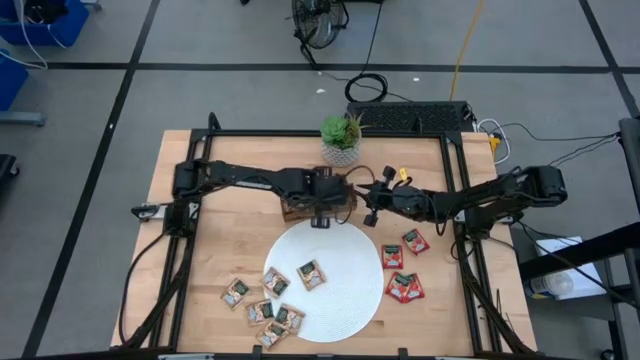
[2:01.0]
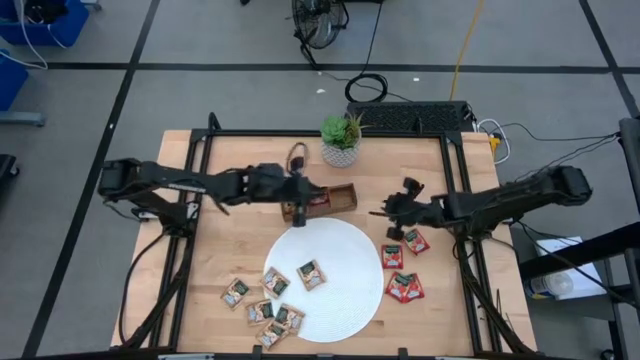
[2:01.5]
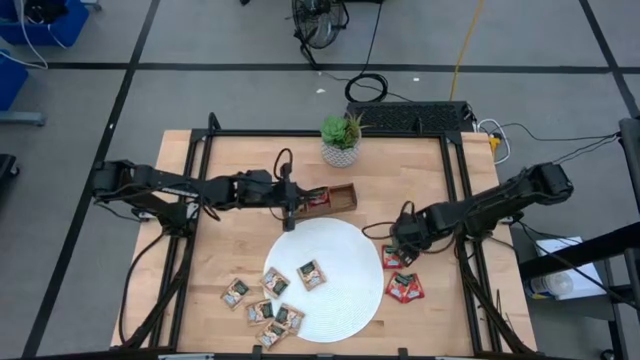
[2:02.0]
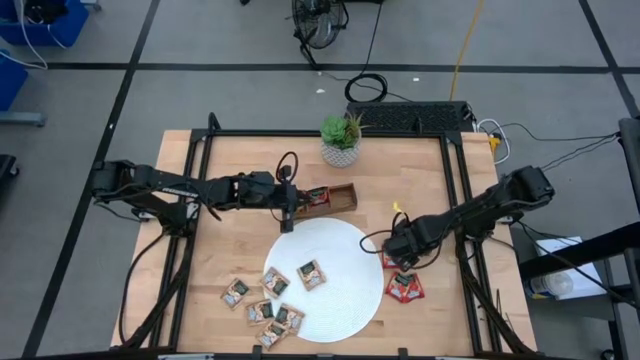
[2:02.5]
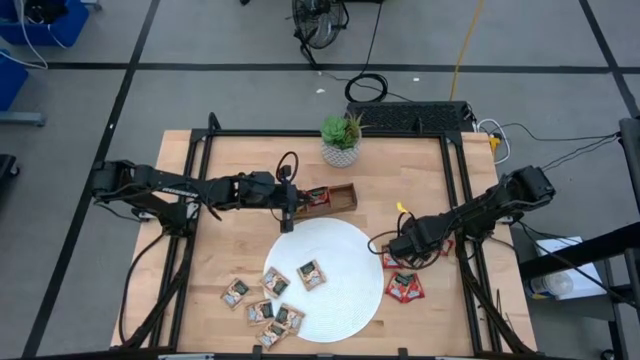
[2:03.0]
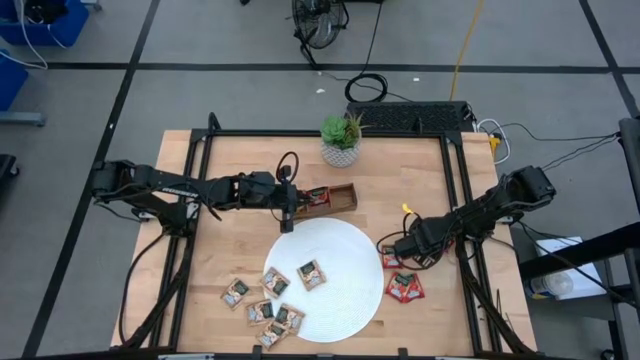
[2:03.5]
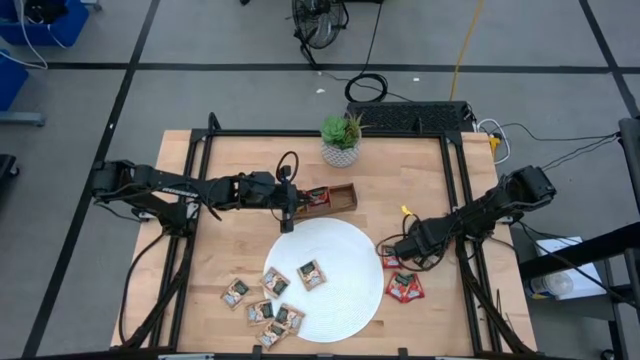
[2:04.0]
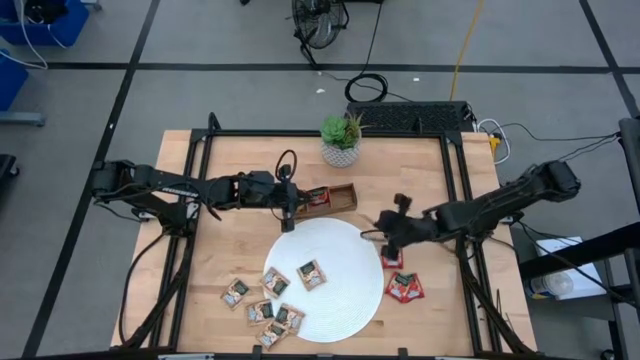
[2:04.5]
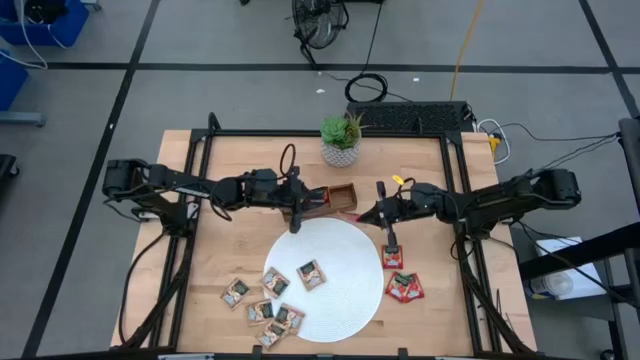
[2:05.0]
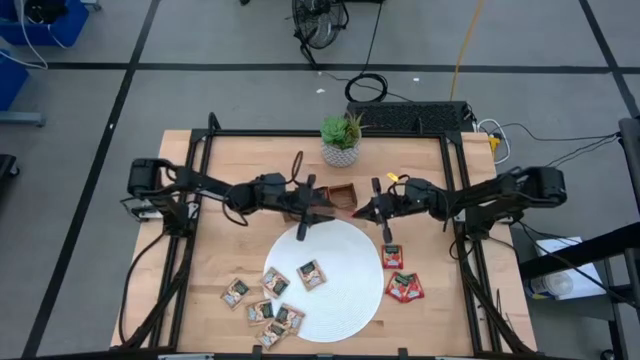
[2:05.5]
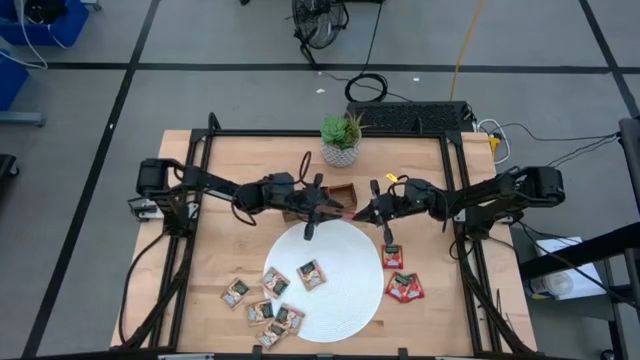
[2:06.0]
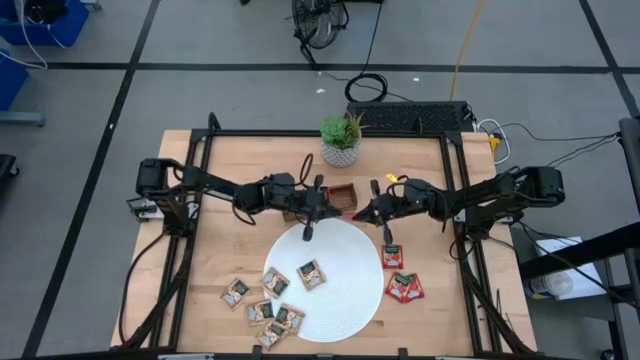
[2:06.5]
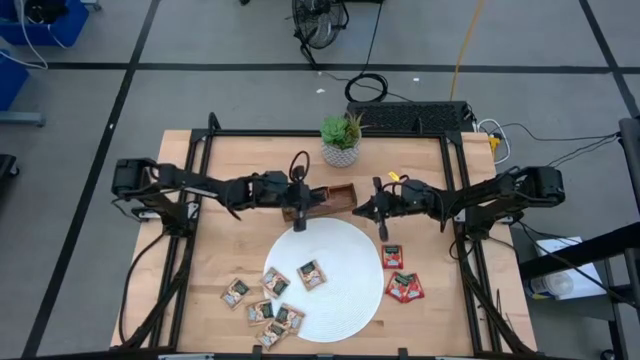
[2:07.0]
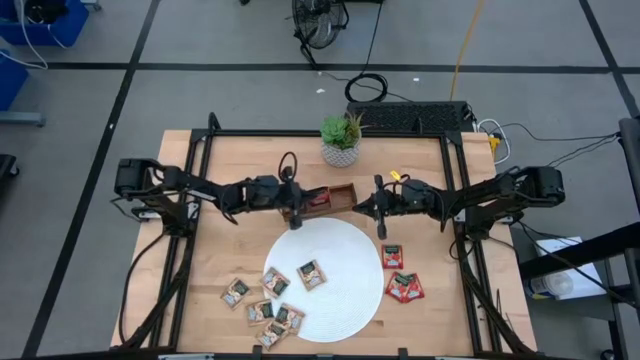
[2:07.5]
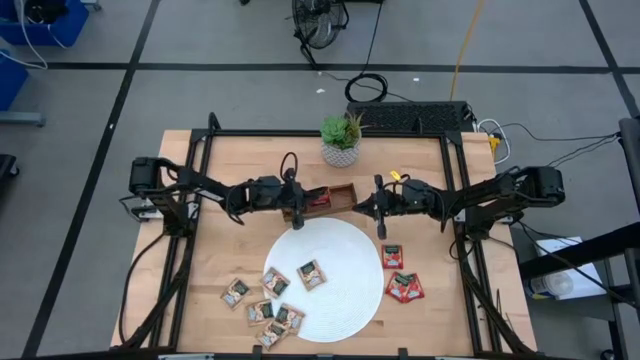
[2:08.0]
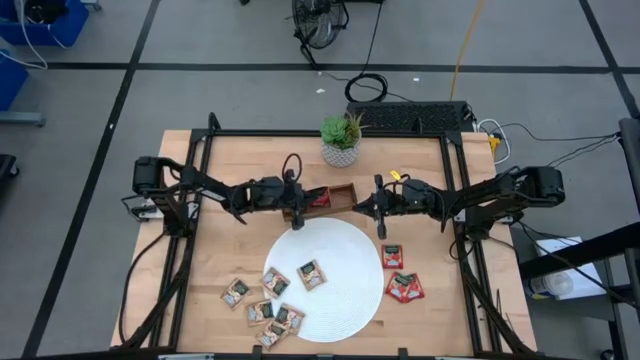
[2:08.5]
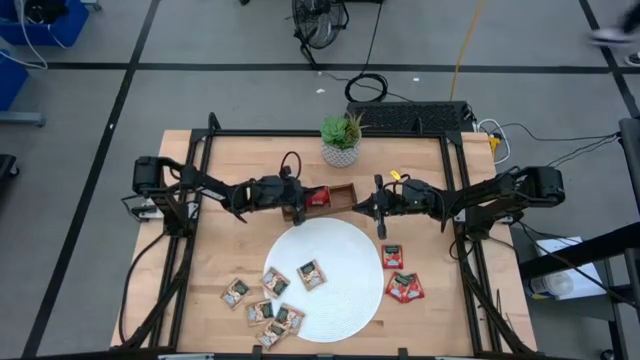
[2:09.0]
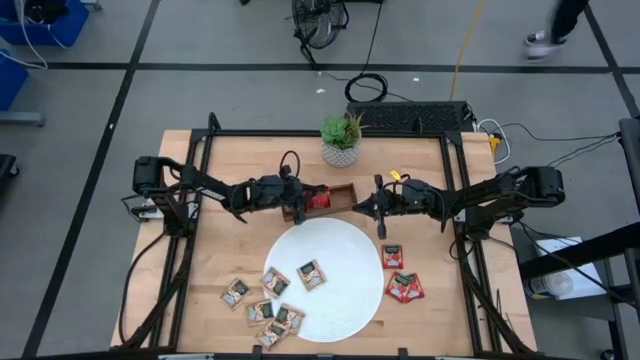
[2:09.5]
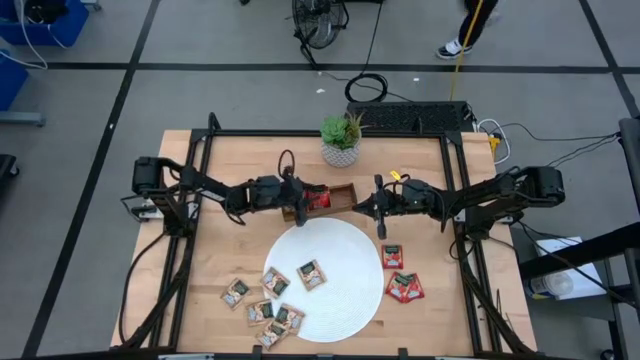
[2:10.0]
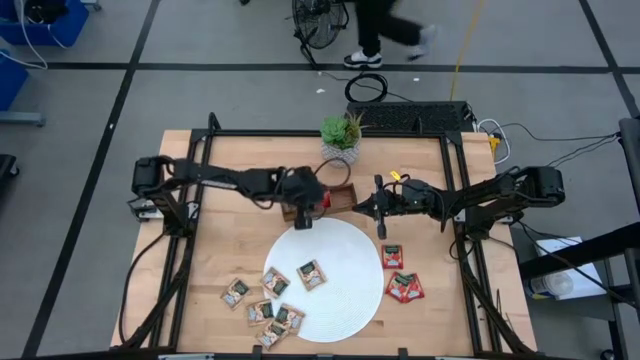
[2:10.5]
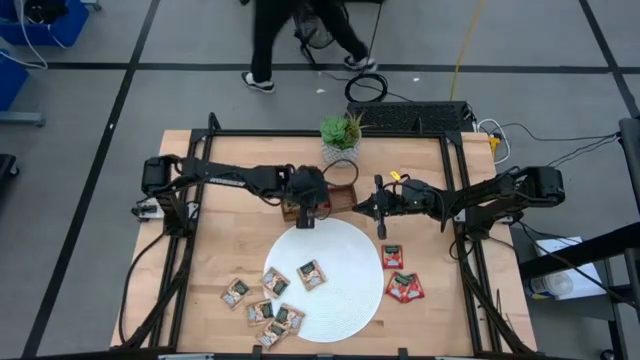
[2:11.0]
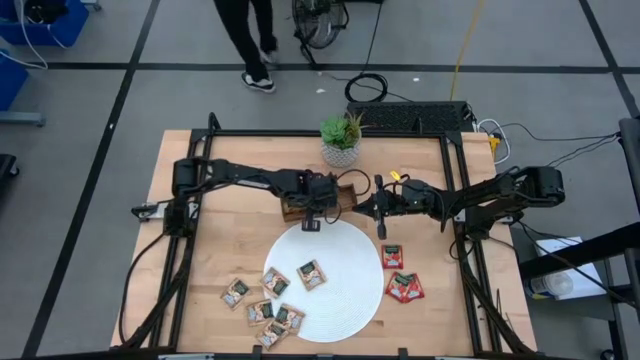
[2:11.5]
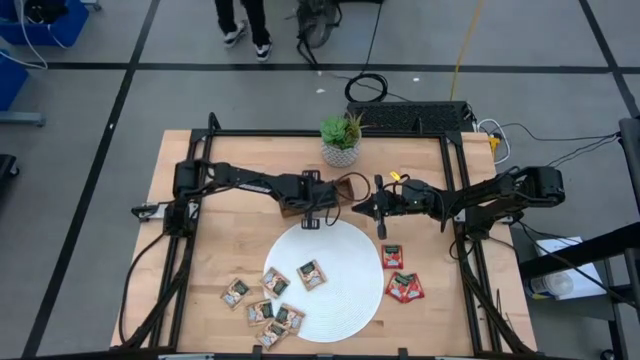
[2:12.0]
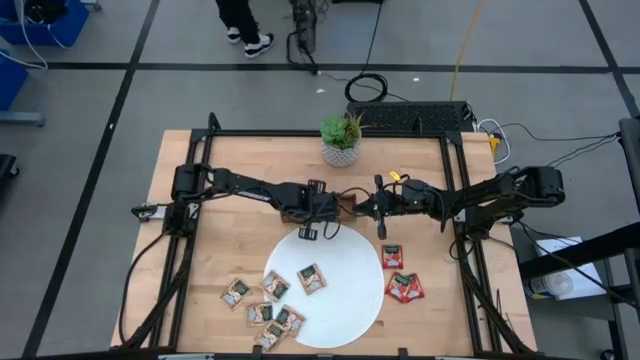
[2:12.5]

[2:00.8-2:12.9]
Task: Pick & Place Tea
Put the strawberry tea bag into the wooden organizer

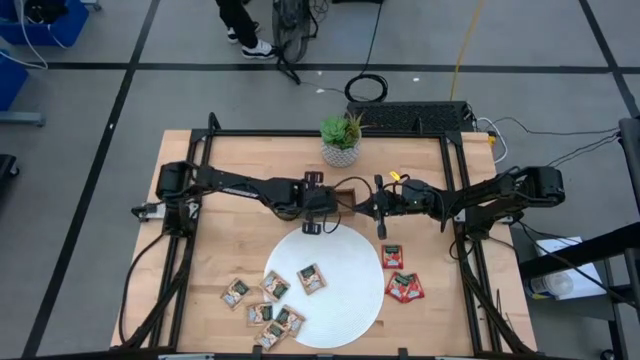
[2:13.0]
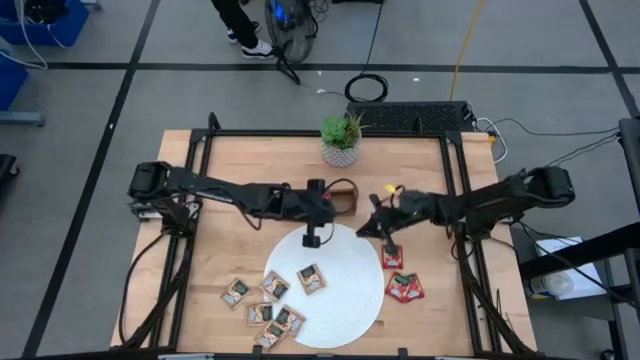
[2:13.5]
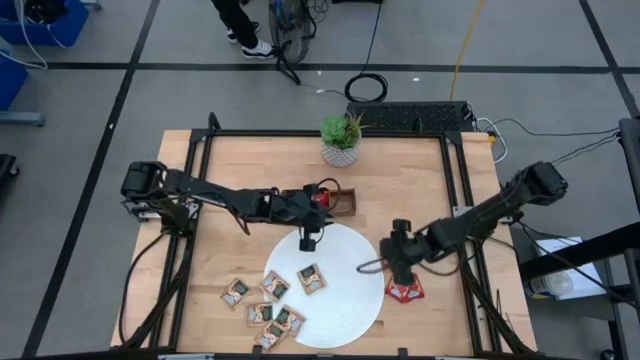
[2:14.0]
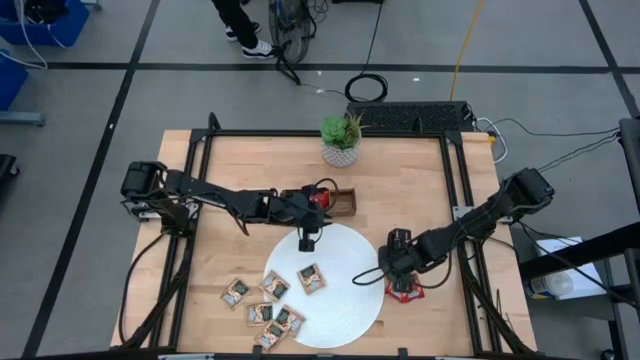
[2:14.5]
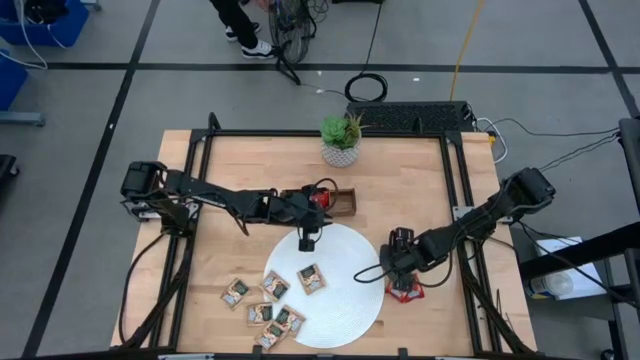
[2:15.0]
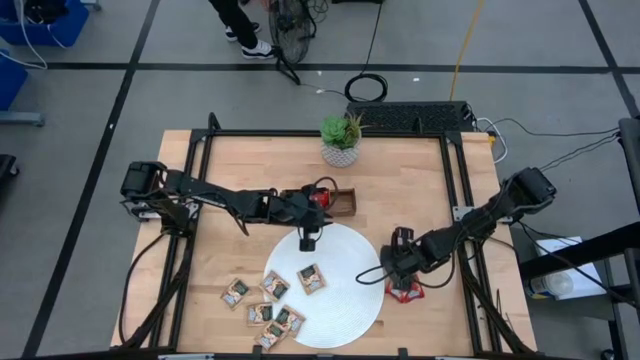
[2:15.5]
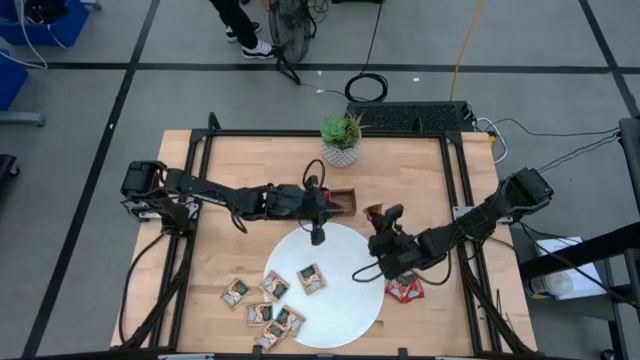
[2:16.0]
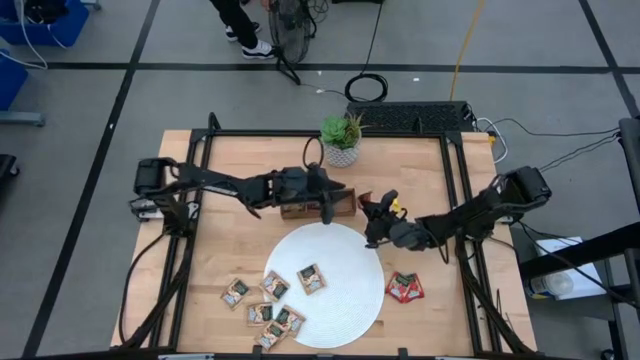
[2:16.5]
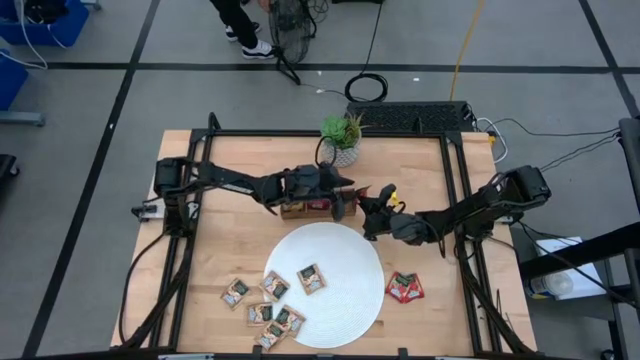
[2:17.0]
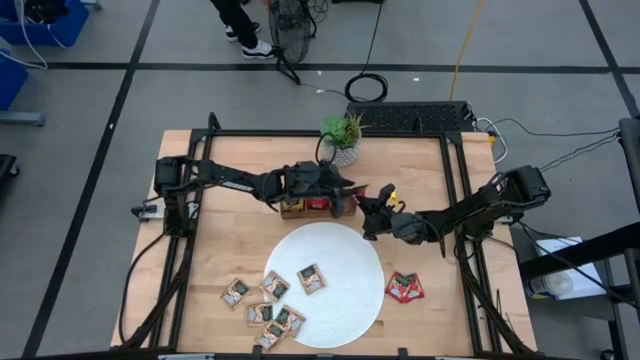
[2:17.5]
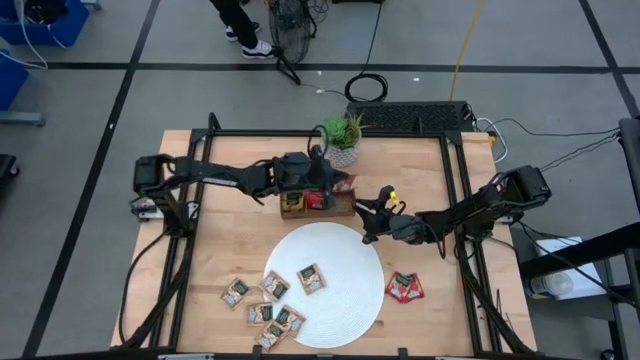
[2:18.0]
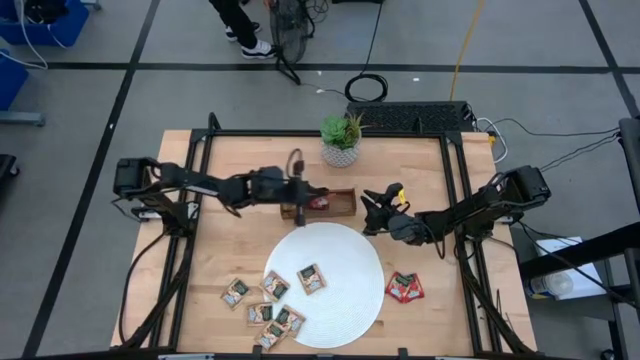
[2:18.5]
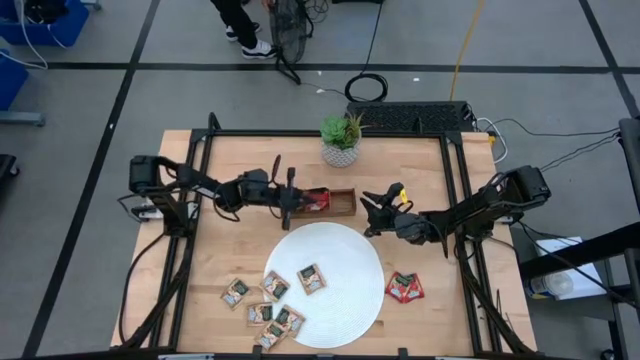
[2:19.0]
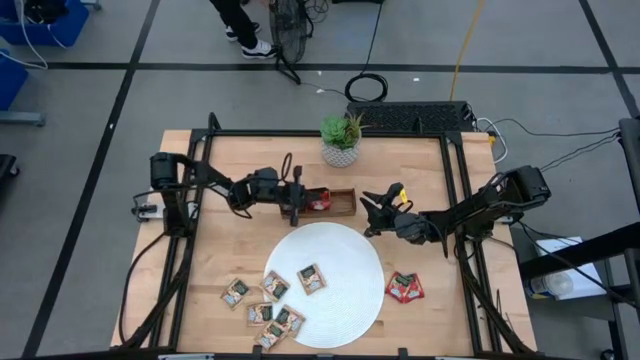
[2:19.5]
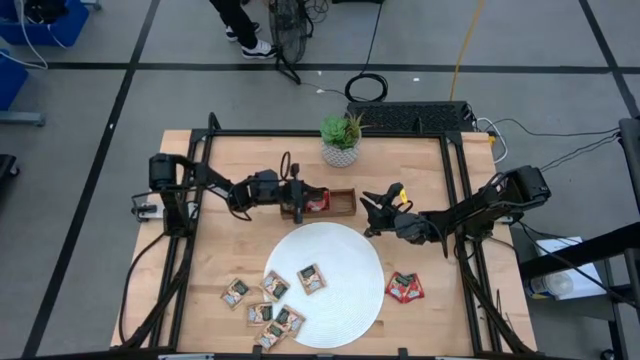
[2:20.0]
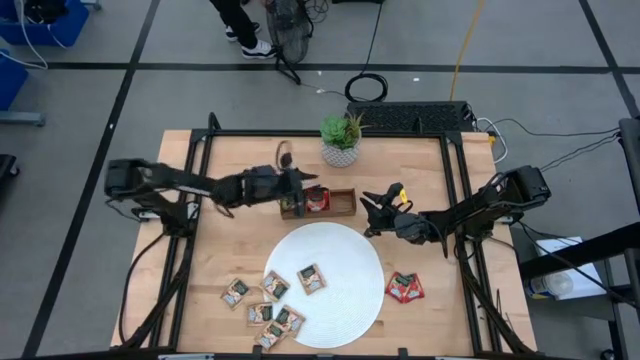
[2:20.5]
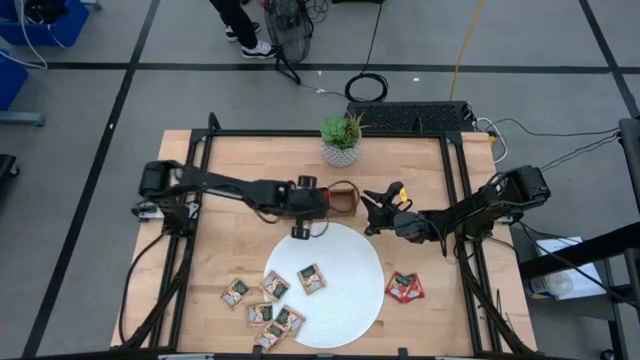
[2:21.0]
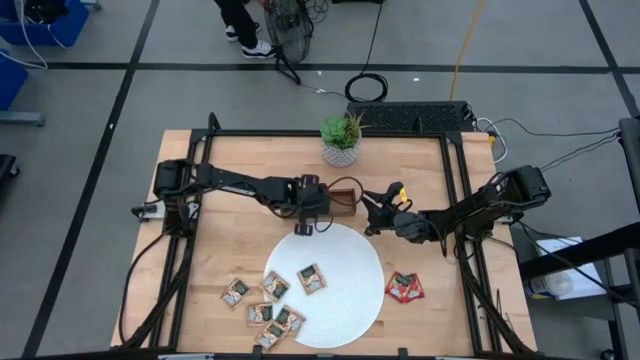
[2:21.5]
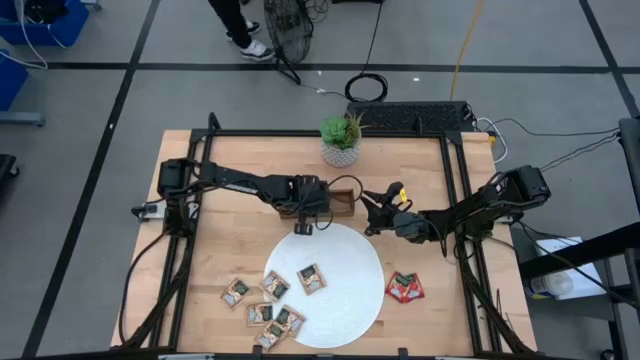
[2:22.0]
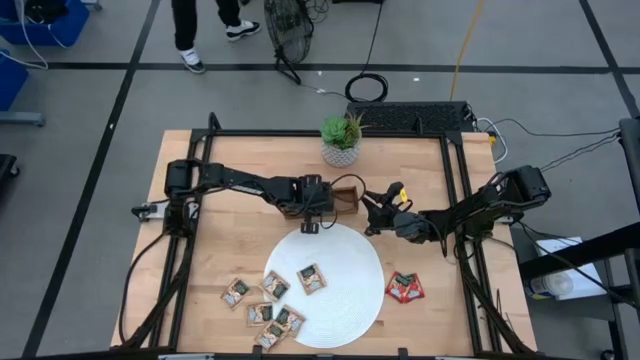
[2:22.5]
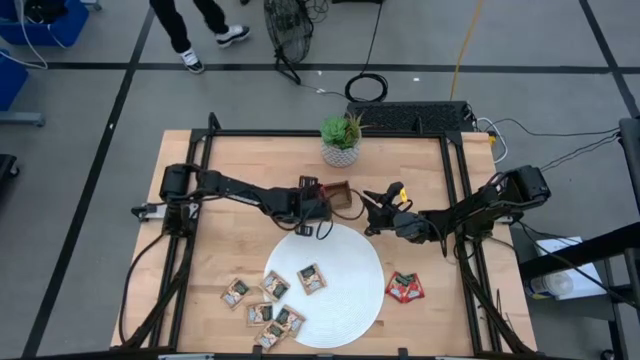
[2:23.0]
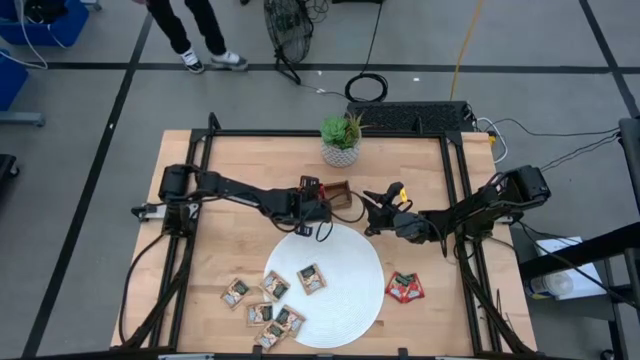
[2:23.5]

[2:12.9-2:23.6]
Put the strawberry tea bag into the wooden organizer
